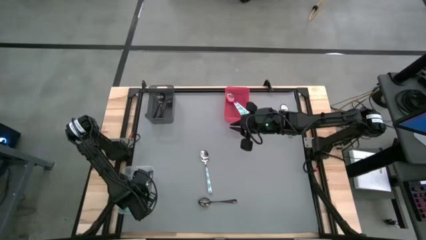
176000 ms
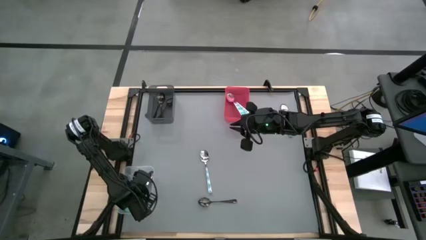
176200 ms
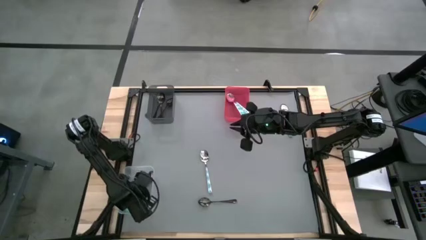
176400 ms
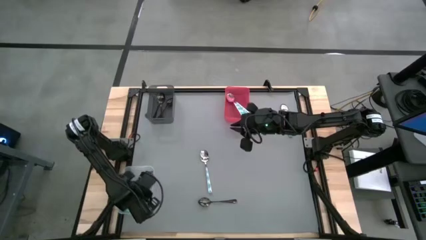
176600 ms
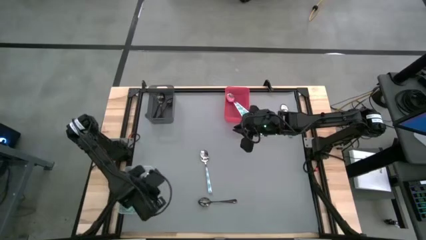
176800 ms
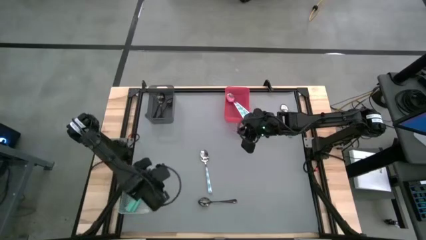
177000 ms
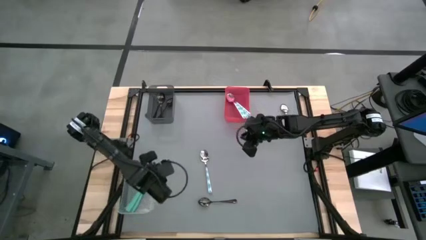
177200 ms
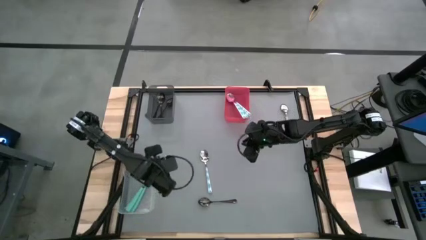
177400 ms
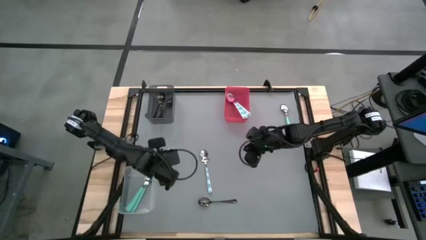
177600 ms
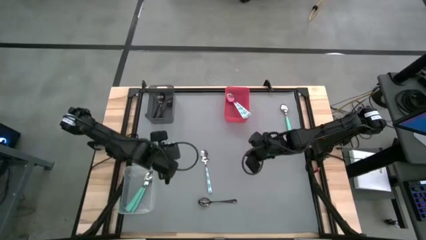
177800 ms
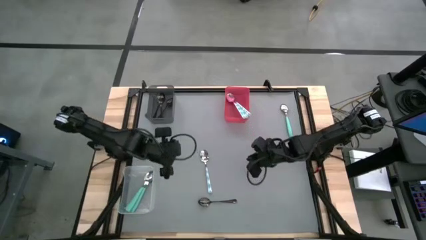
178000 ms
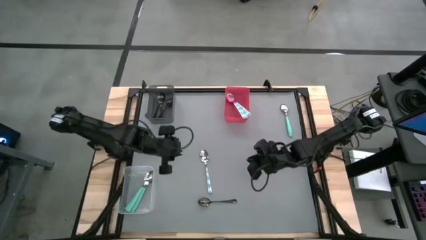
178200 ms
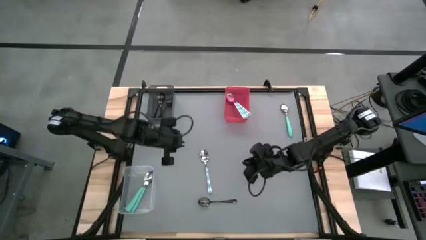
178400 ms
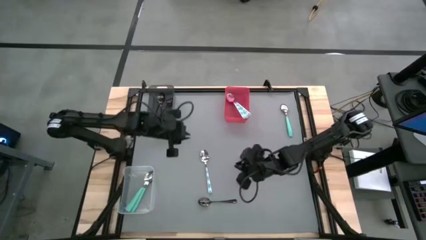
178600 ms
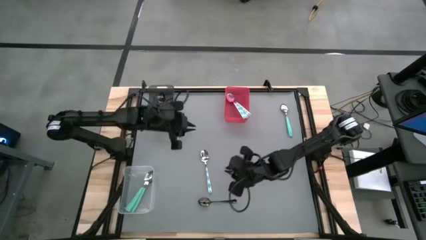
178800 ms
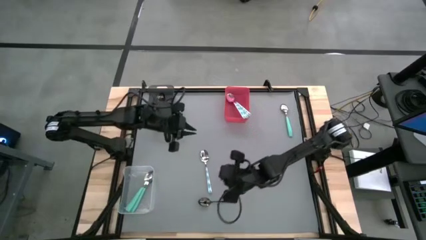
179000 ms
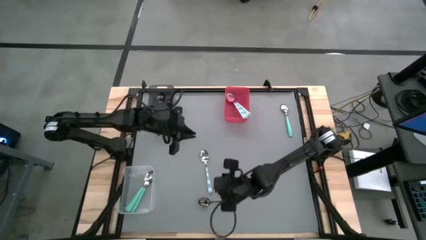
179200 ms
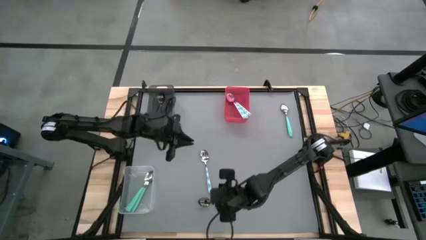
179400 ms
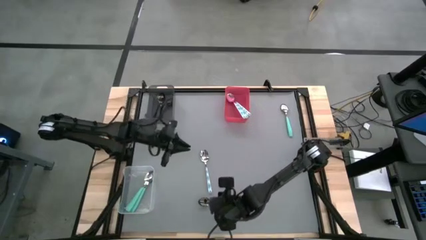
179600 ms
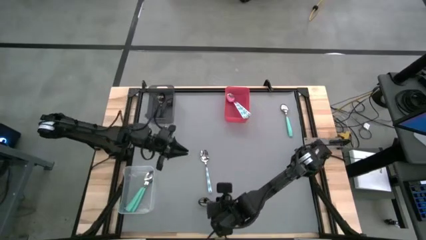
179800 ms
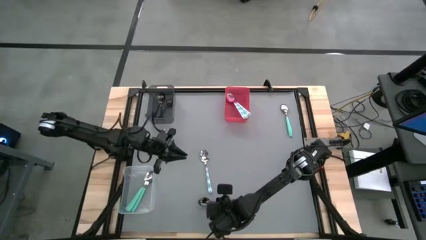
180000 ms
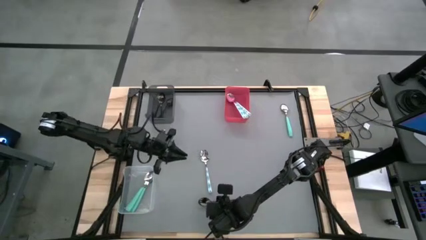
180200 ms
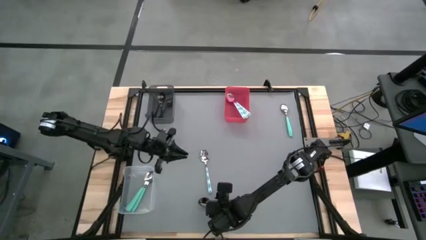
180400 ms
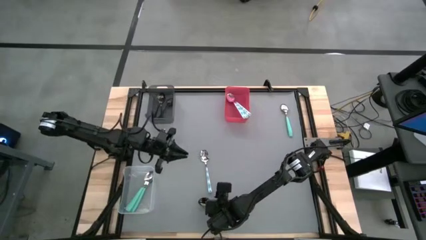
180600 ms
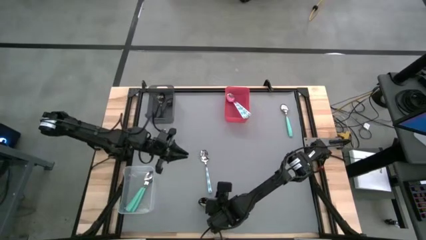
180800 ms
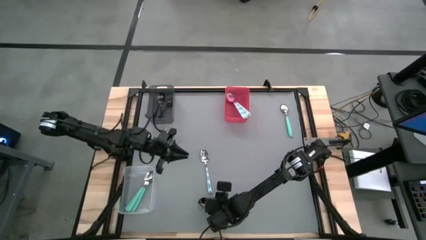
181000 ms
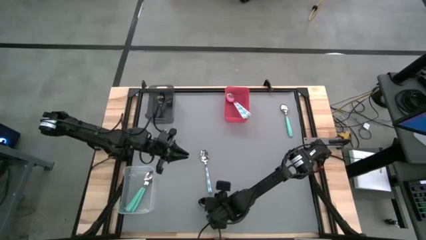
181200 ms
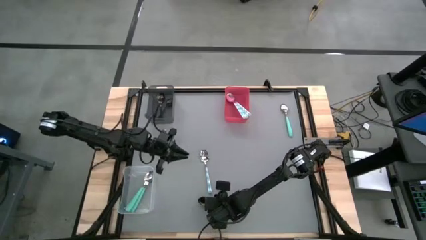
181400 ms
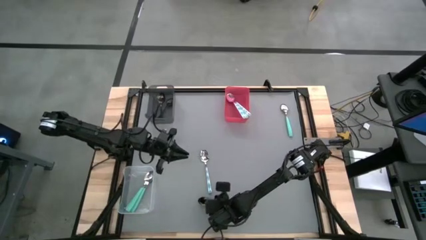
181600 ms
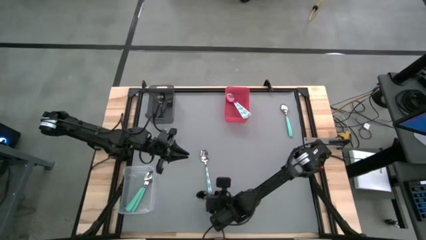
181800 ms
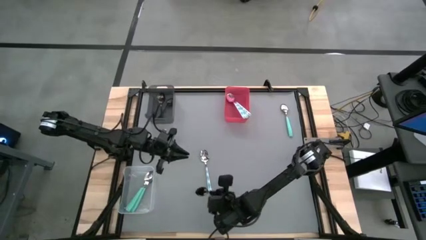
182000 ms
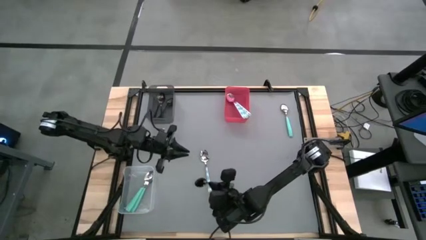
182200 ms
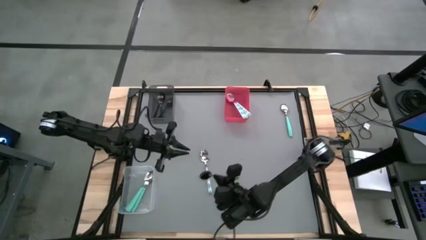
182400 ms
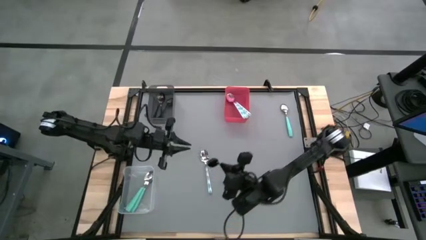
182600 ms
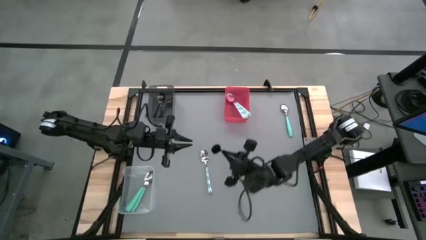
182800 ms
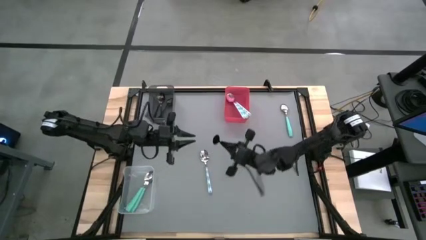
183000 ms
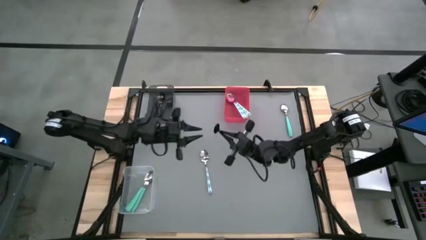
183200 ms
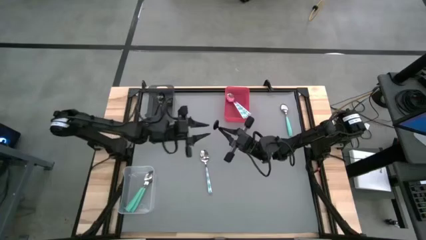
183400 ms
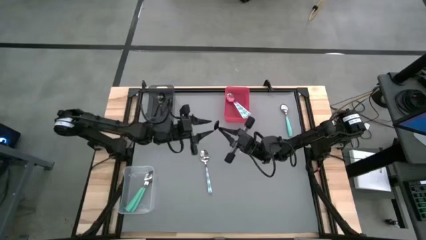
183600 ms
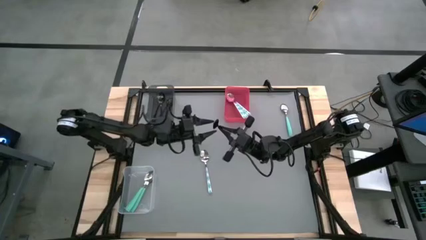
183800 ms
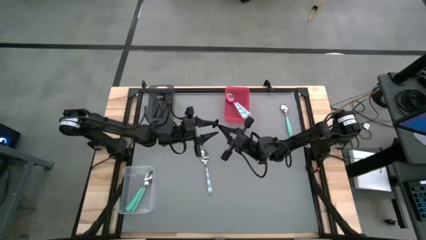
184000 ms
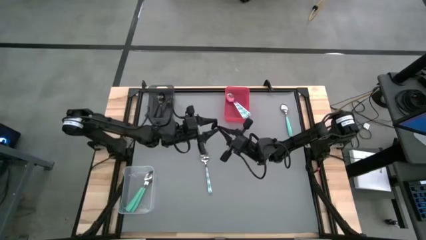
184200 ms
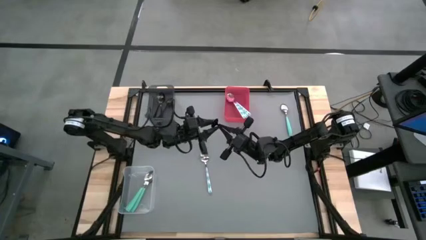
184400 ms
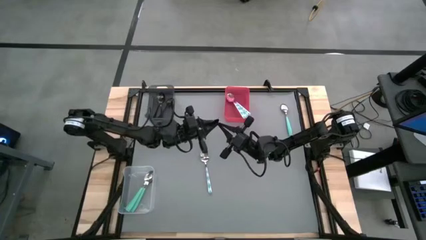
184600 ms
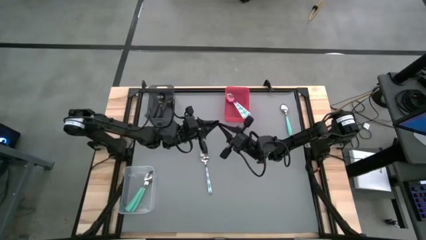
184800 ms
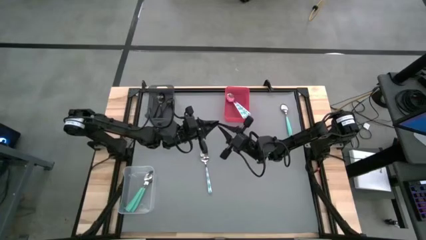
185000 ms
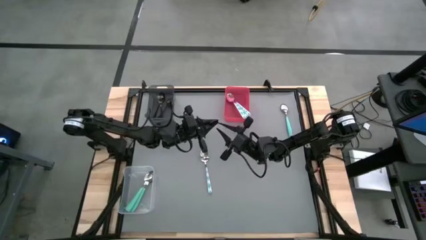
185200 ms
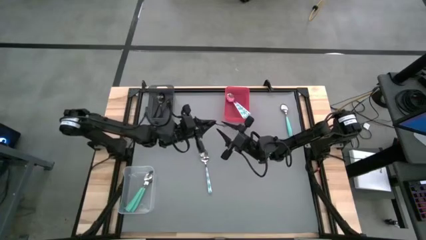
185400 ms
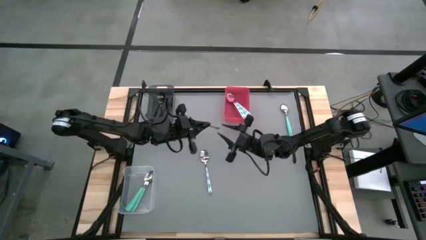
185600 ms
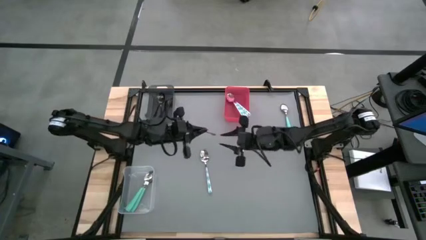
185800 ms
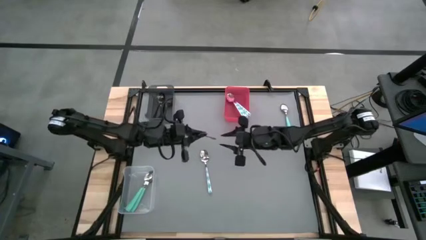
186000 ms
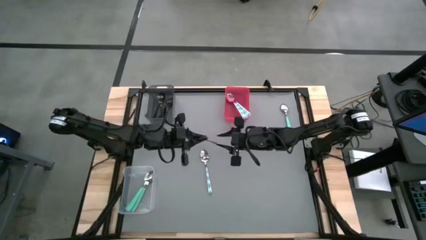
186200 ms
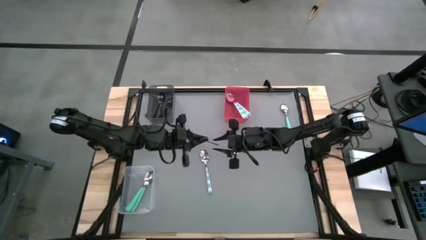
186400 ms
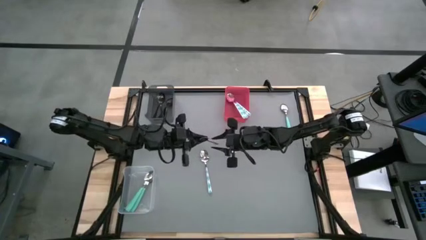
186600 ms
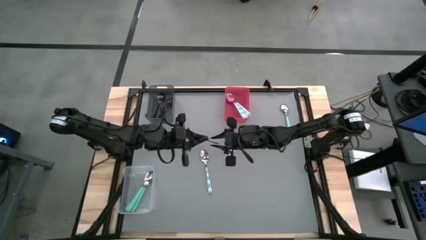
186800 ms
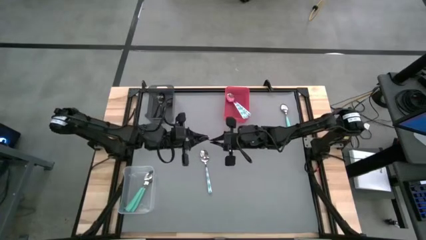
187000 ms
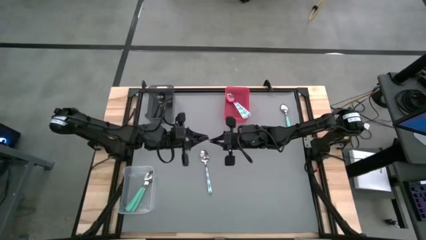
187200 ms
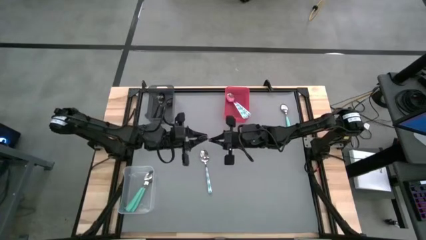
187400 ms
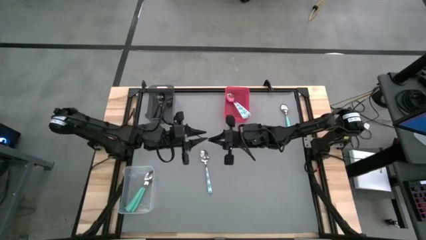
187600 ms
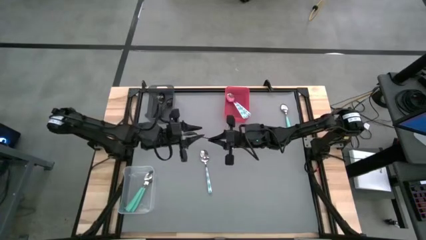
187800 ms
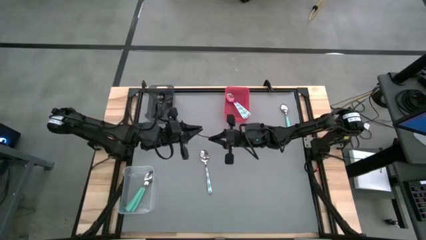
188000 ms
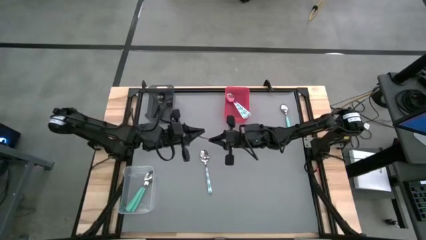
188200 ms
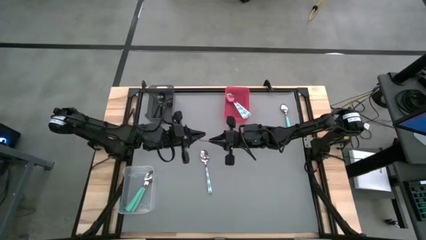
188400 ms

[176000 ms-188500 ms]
Task: Sort silverware by color (type)
Put the black spoon into the black bin

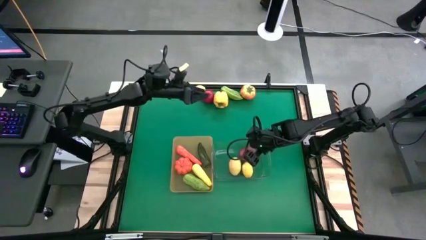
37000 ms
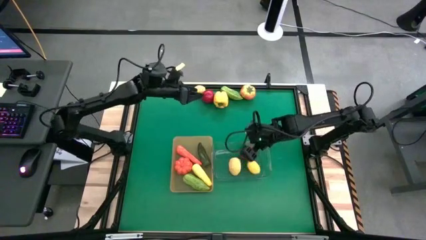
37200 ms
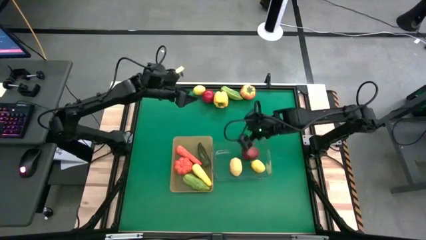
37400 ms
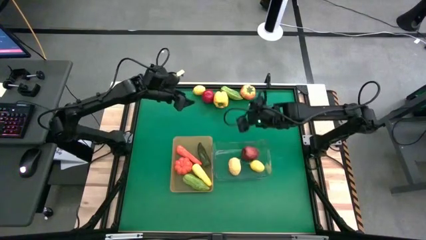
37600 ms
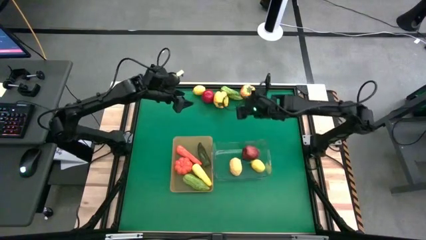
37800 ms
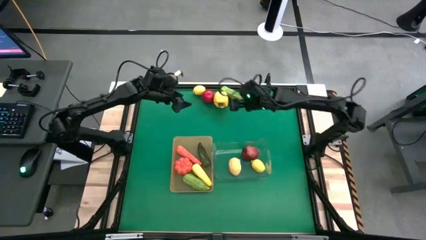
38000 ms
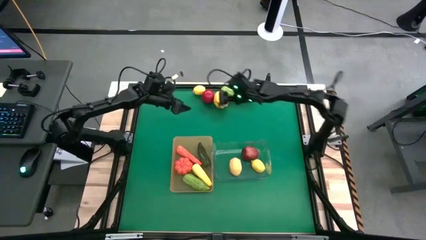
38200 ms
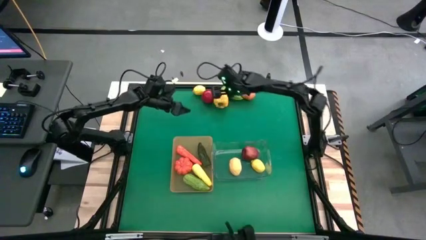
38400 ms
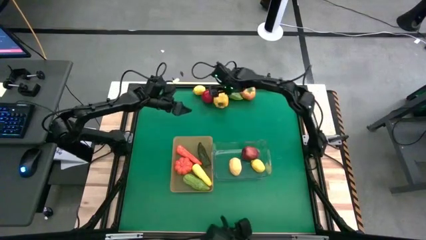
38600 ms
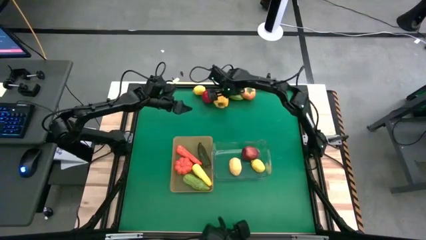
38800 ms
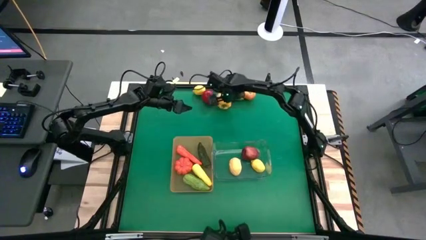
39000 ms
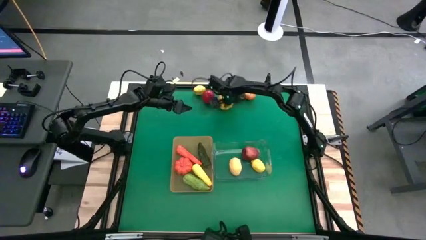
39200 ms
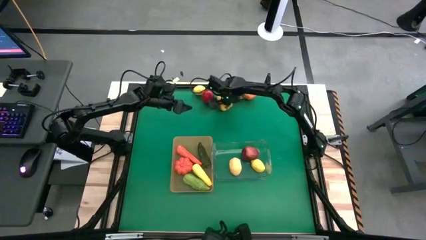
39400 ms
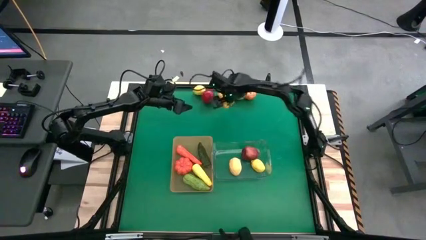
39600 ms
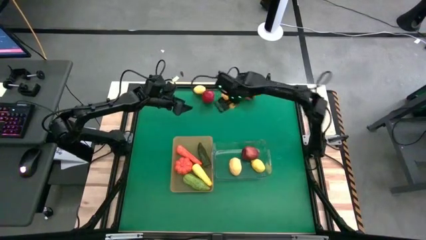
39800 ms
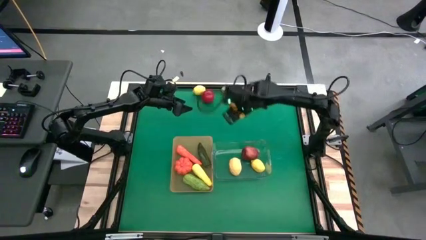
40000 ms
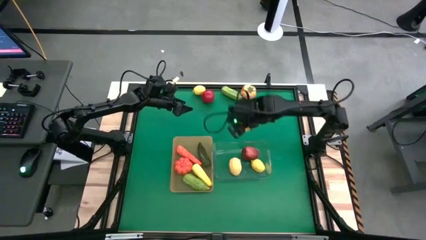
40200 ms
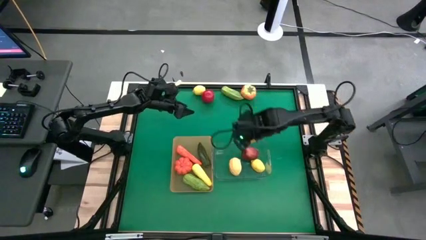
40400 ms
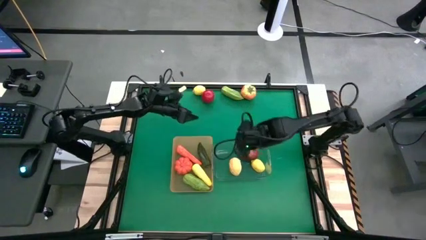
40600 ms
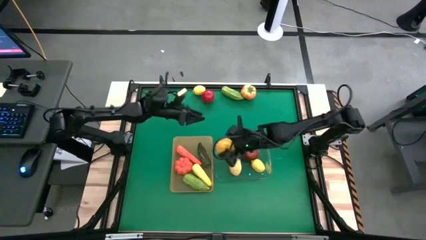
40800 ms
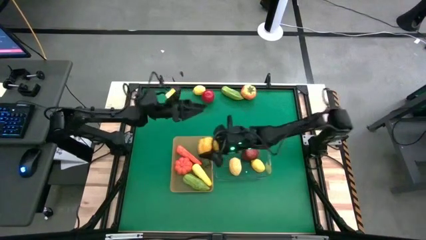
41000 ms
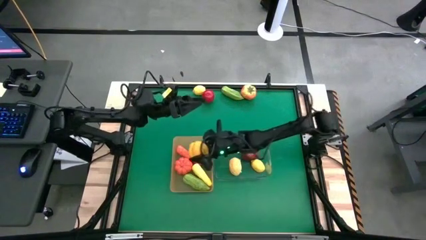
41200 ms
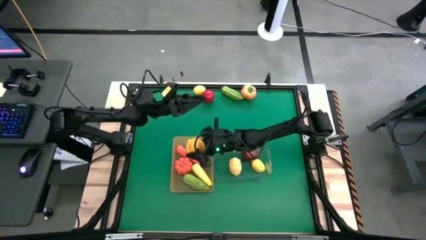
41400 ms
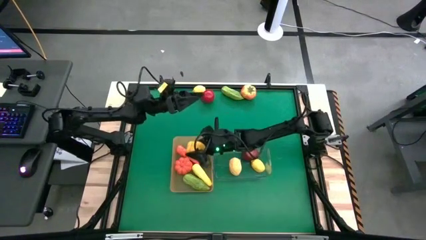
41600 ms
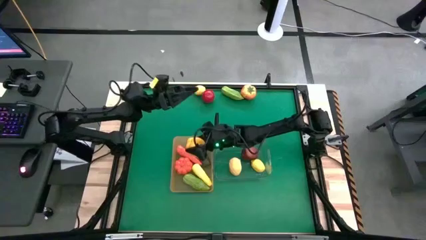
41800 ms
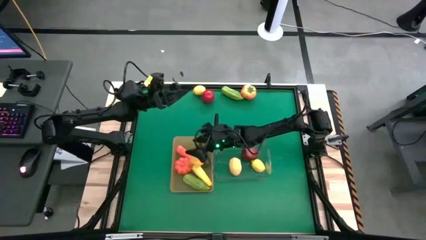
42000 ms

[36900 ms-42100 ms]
Task: Sort produce into baskets
Put the yellow bell pepper into the orange bin
